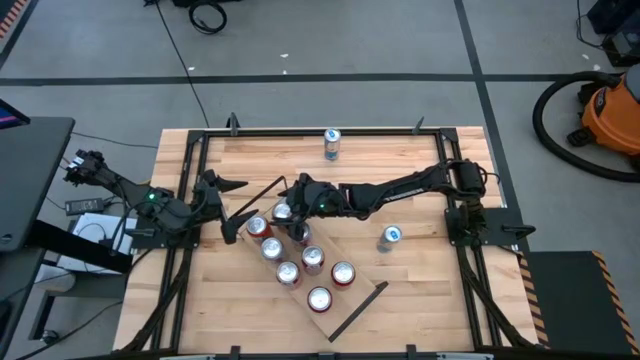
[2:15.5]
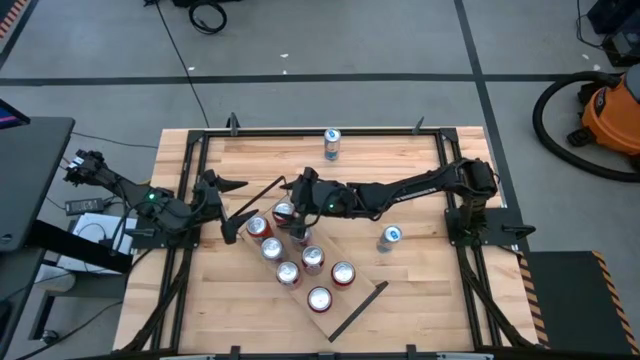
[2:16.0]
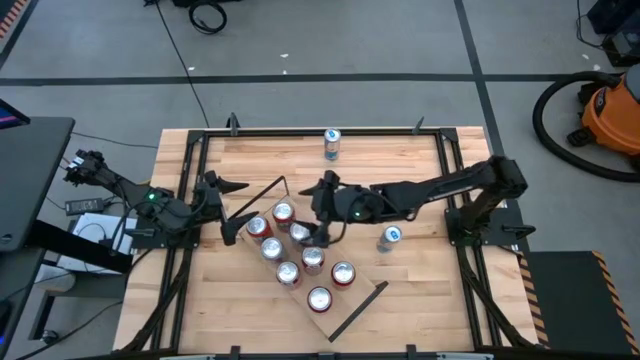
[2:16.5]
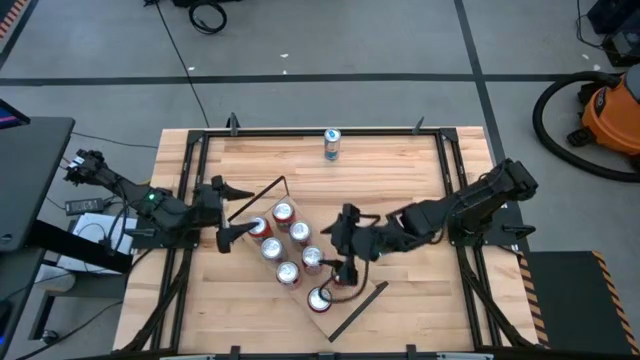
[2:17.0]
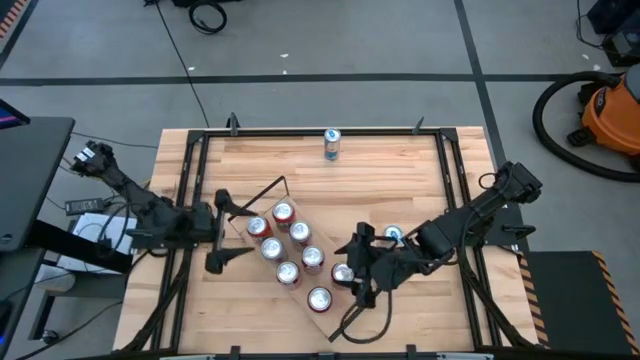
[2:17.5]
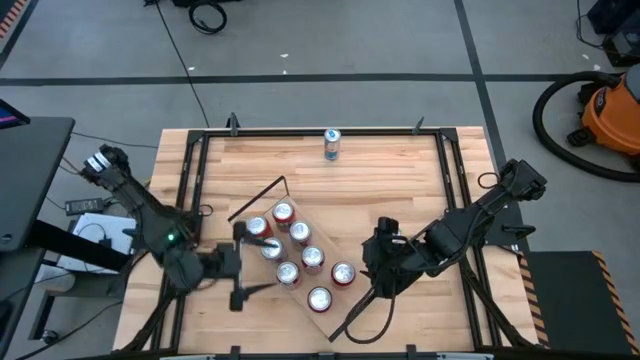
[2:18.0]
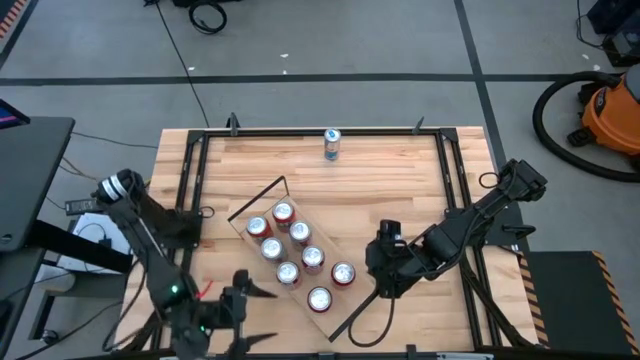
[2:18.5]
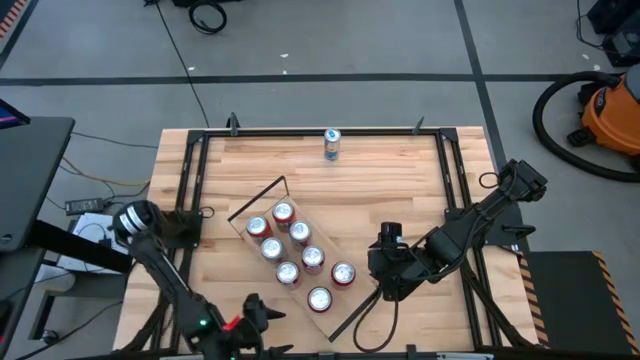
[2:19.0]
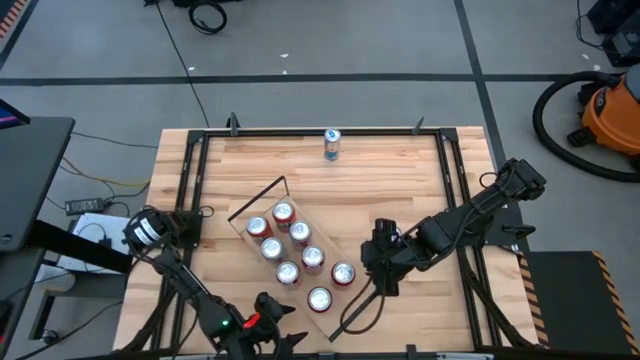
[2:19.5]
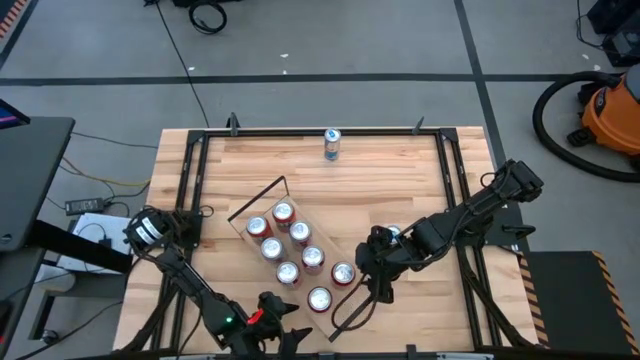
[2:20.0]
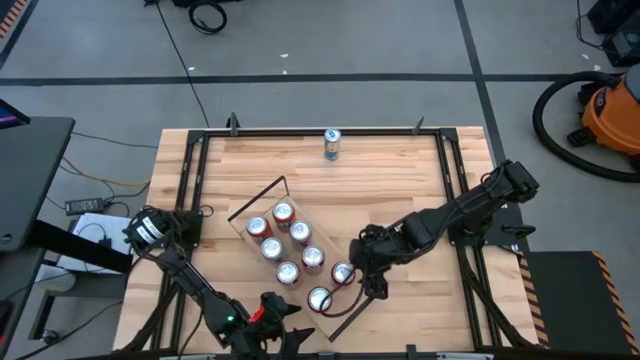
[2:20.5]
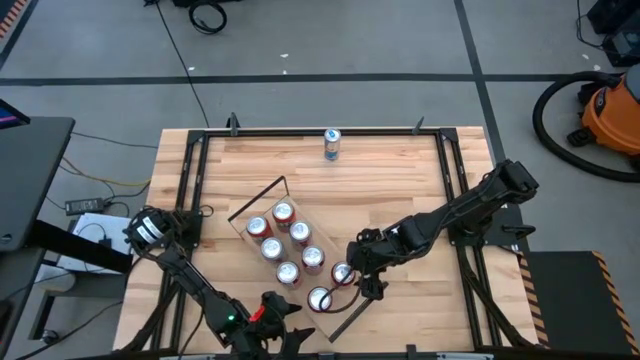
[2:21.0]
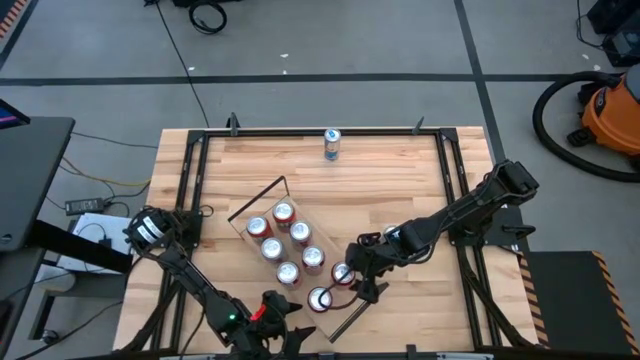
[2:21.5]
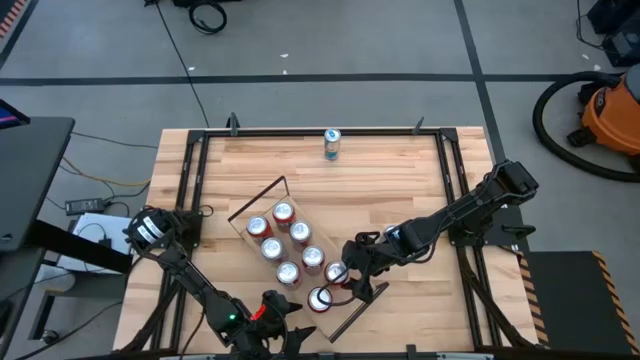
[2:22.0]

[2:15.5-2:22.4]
Task: Place canned beverage on shelf
Adjust the red and black soda can on the shelf

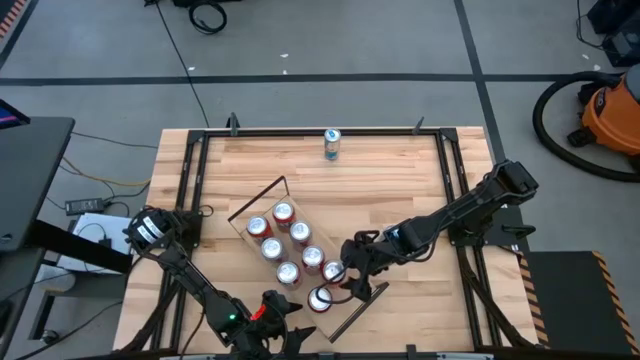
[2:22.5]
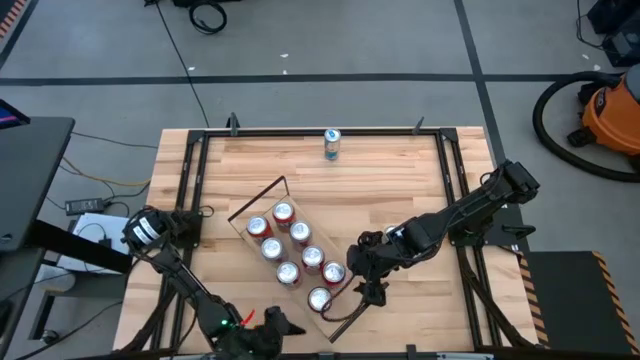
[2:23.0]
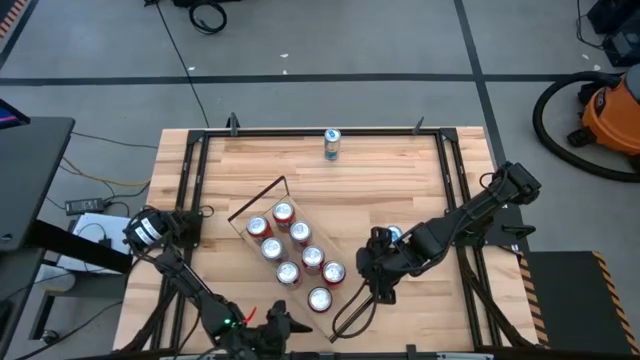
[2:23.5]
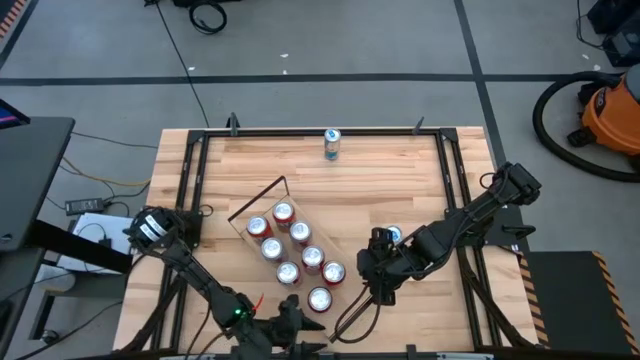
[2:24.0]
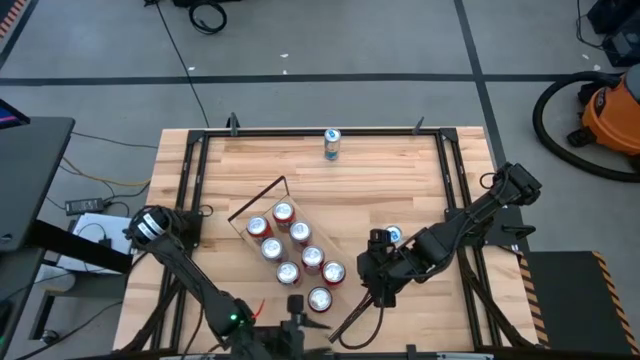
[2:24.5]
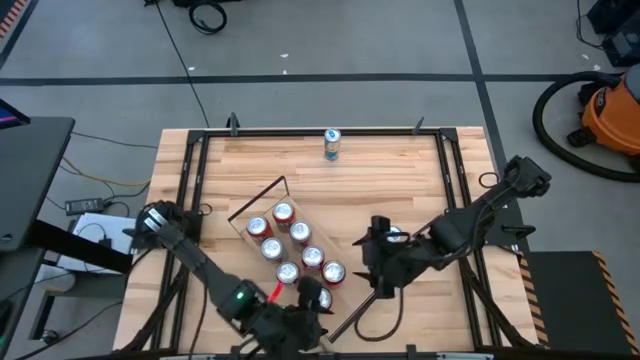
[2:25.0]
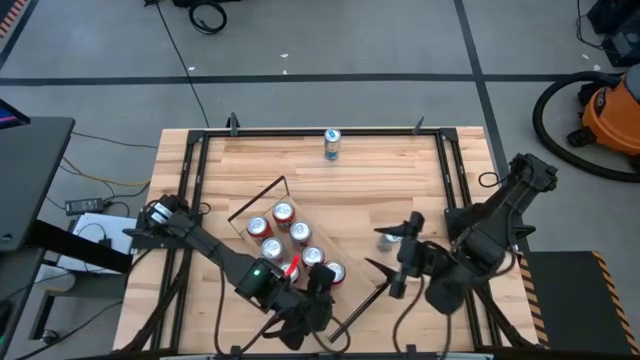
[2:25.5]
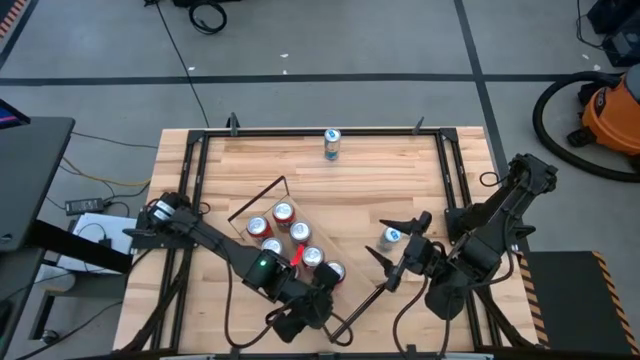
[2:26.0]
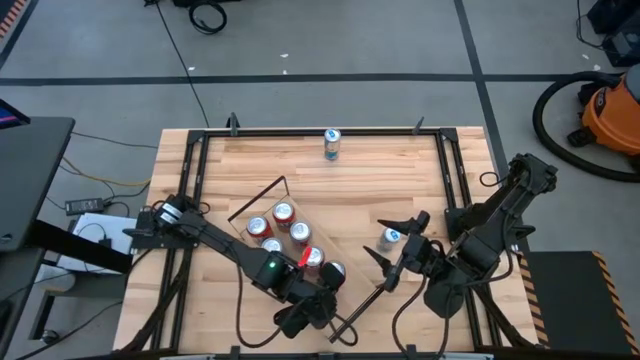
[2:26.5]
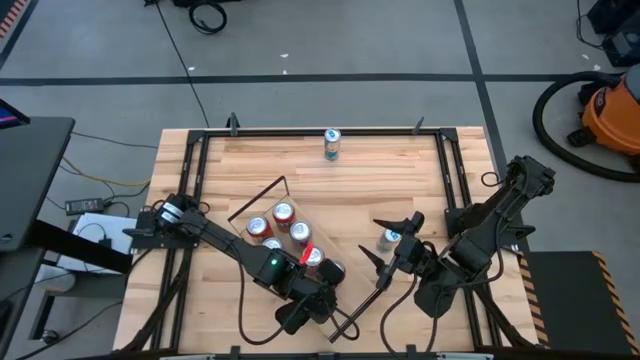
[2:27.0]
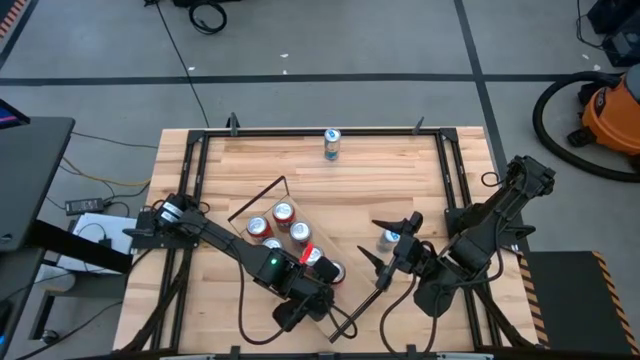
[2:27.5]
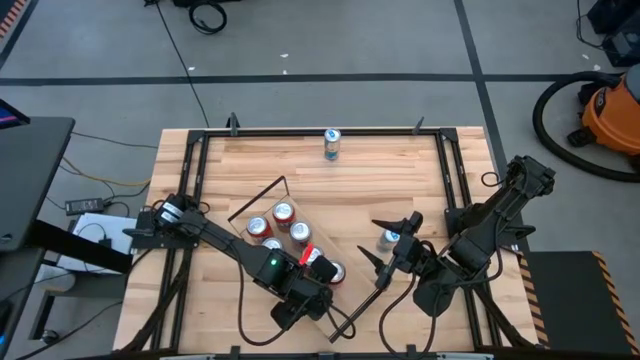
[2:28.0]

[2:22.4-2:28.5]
Adjust the red and black soda can on the shelf

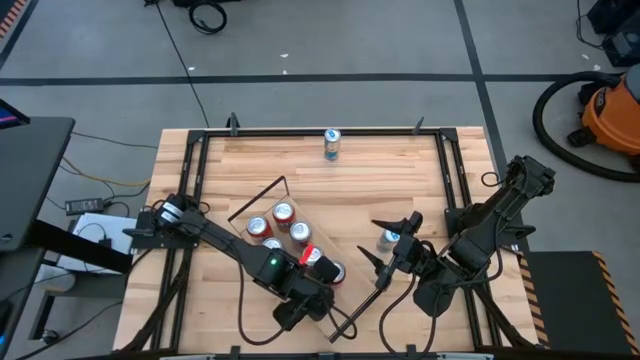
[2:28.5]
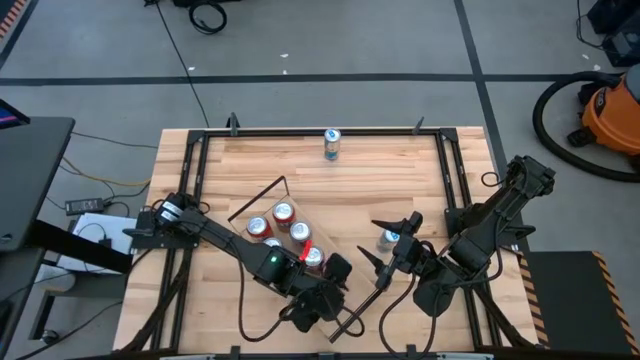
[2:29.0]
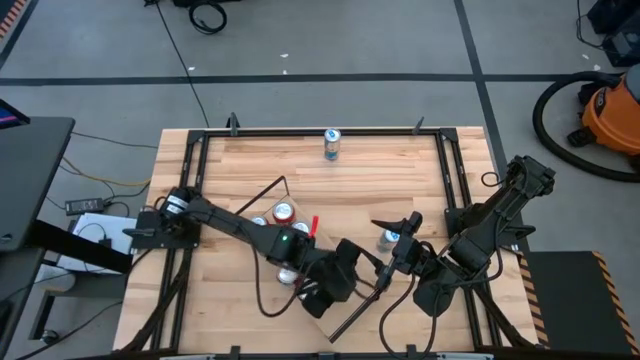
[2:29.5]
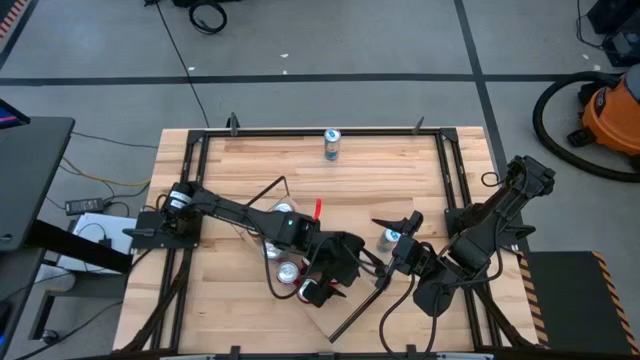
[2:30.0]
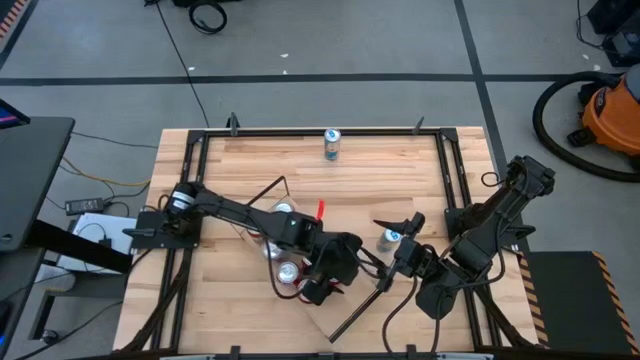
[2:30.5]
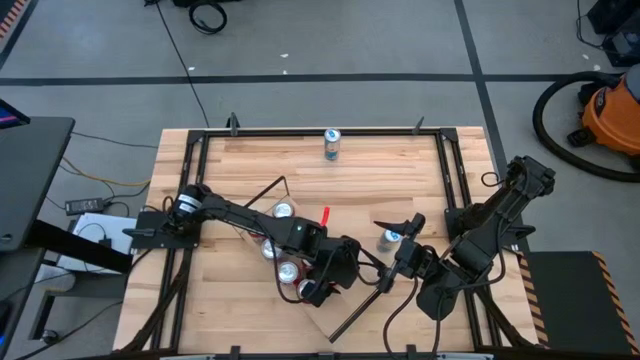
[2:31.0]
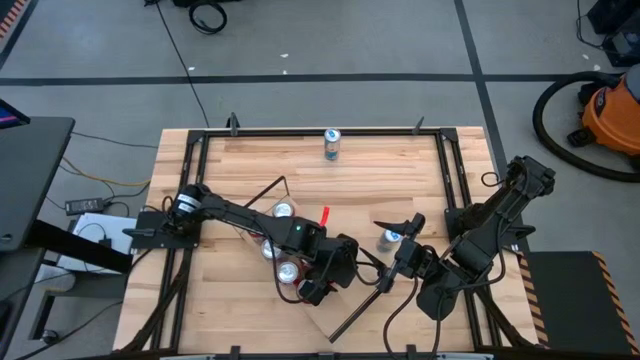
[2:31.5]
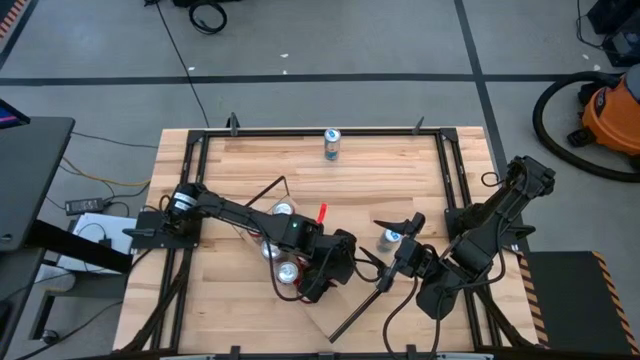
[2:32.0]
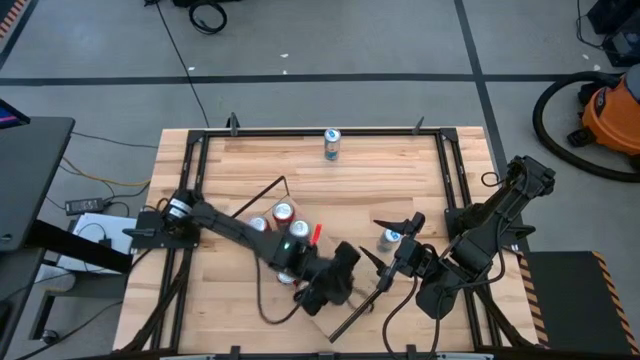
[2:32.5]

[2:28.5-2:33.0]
Adjust the red and black soda can on the shelf

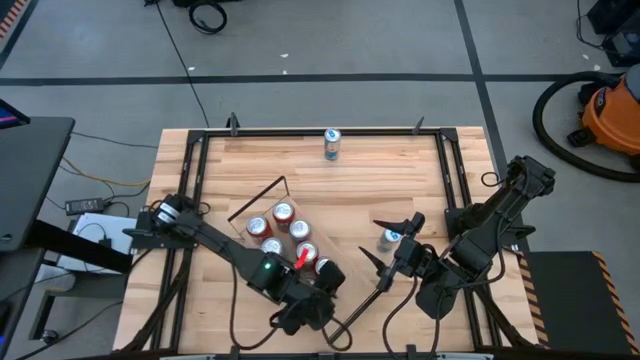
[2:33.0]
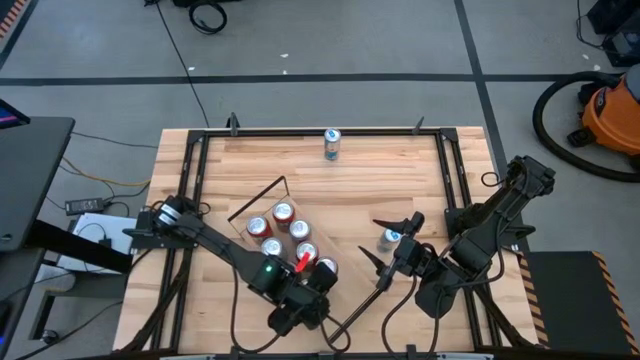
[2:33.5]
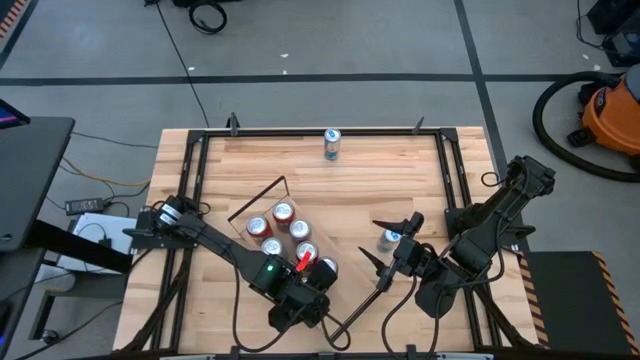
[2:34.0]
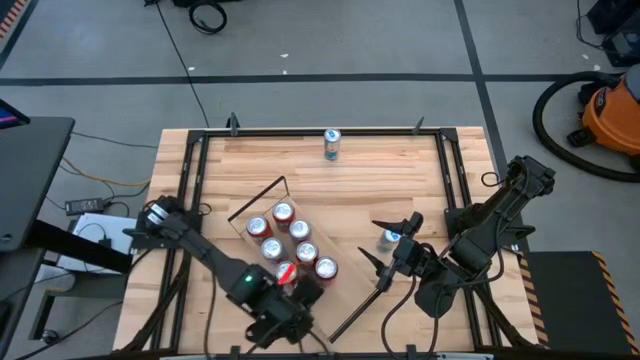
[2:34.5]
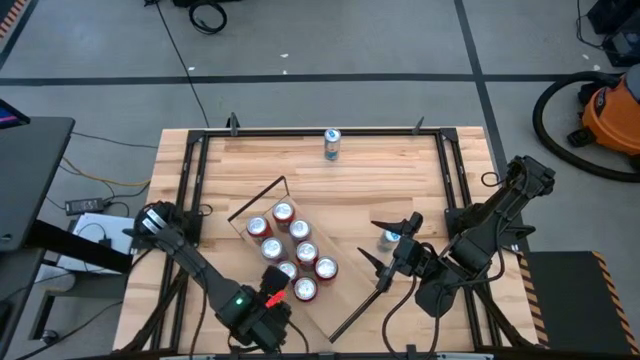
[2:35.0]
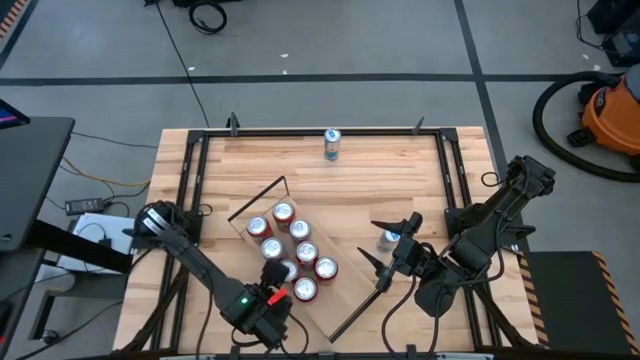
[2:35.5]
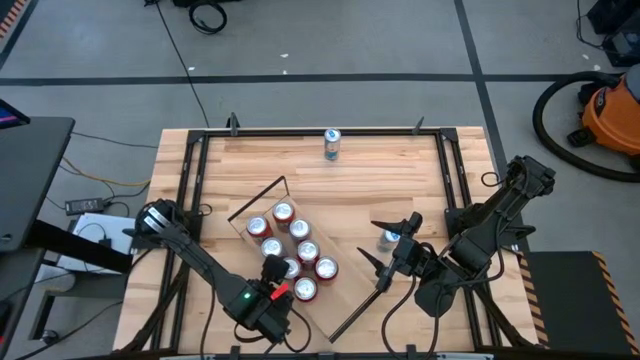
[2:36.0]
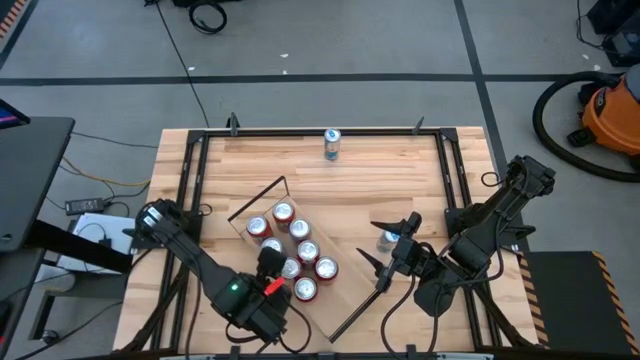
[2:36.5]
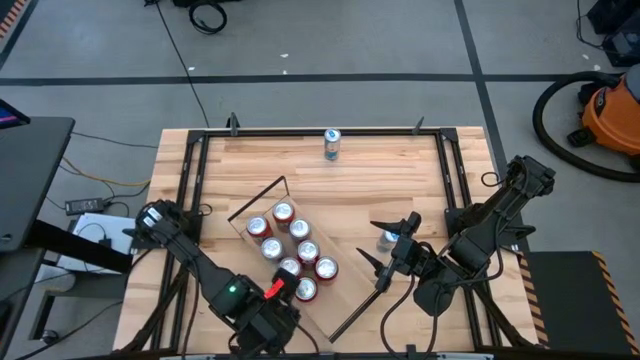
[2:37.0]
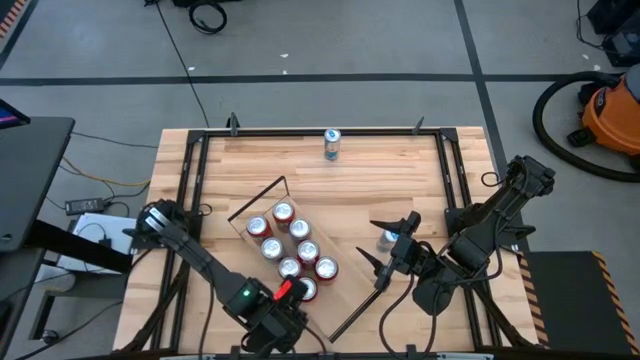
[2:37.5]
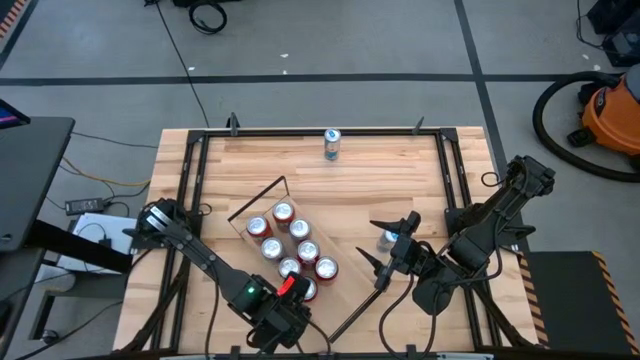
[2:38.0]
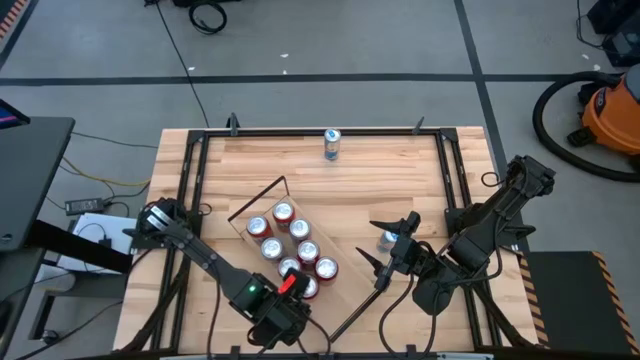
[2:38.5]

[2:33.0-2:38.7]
Adjust the red soda can on the shelf
